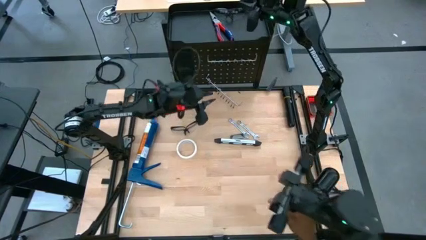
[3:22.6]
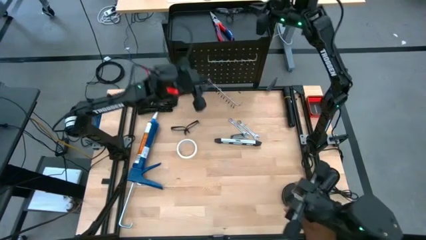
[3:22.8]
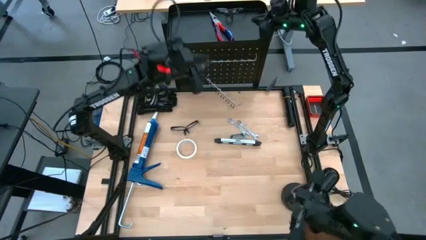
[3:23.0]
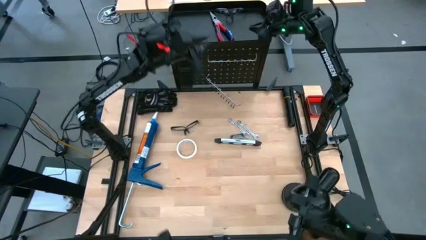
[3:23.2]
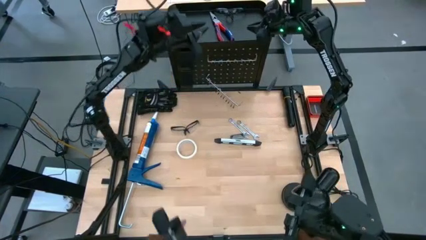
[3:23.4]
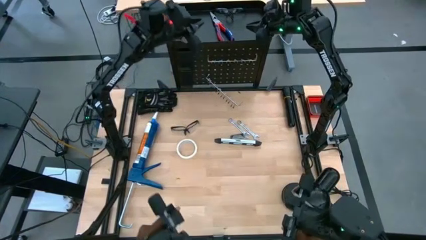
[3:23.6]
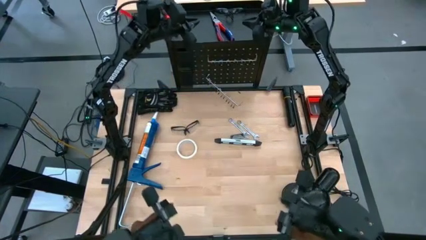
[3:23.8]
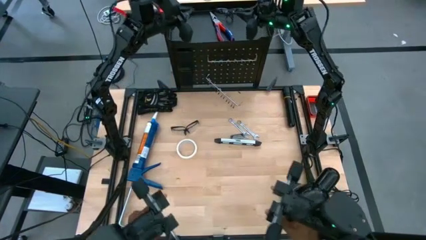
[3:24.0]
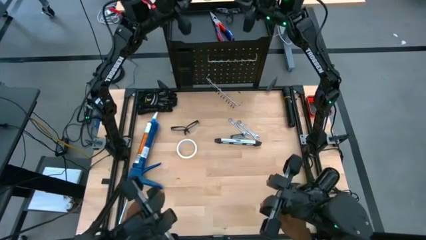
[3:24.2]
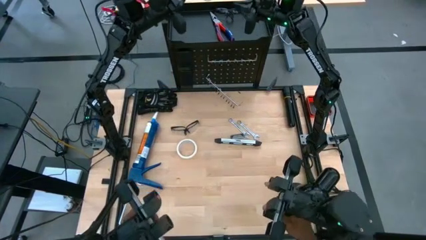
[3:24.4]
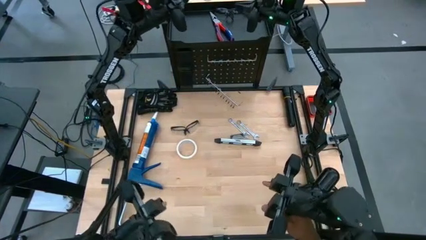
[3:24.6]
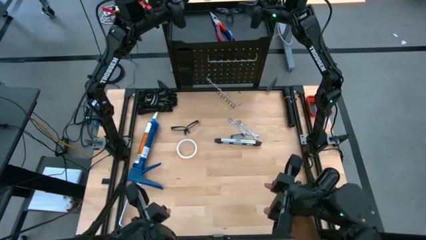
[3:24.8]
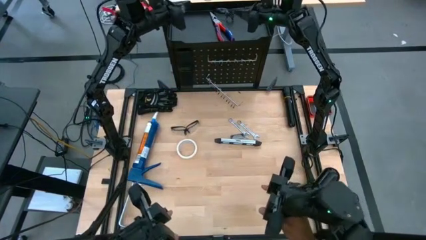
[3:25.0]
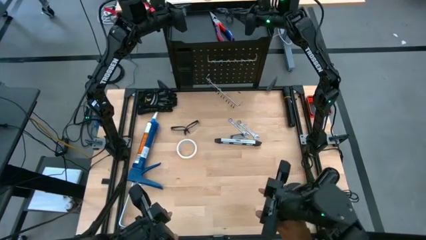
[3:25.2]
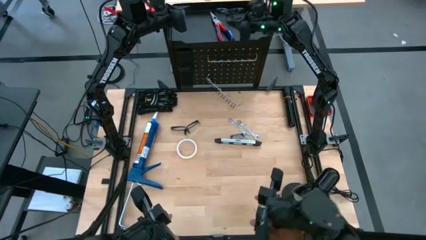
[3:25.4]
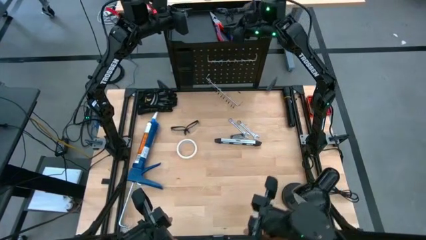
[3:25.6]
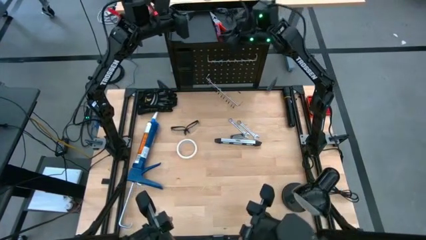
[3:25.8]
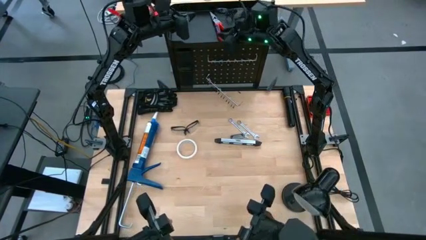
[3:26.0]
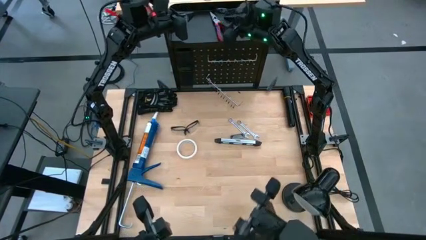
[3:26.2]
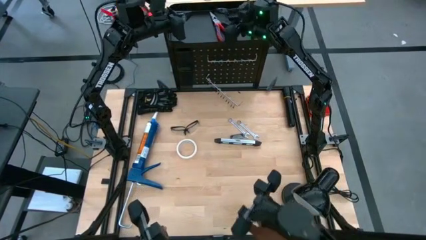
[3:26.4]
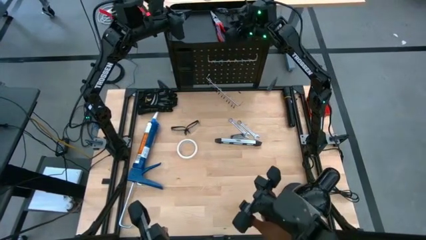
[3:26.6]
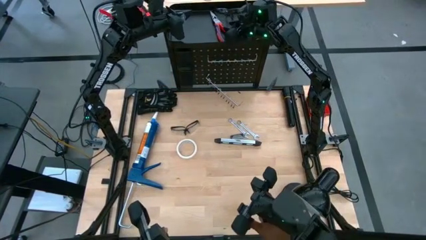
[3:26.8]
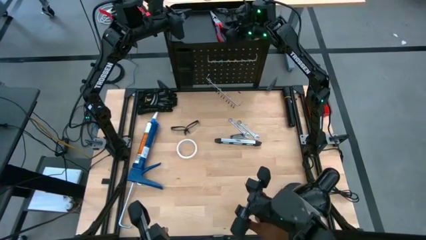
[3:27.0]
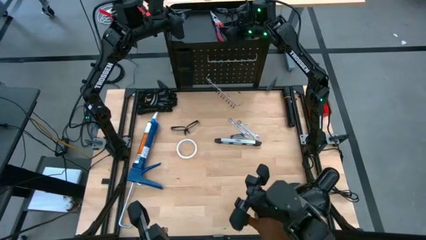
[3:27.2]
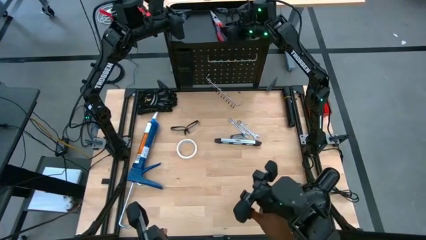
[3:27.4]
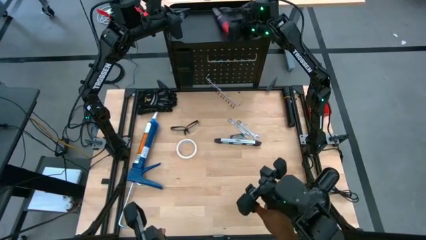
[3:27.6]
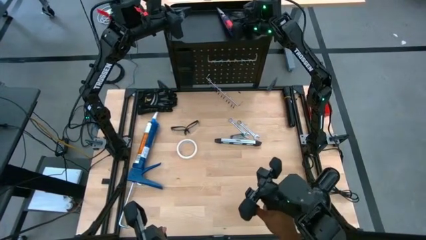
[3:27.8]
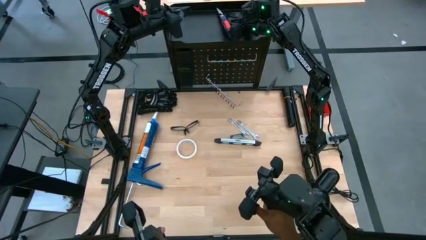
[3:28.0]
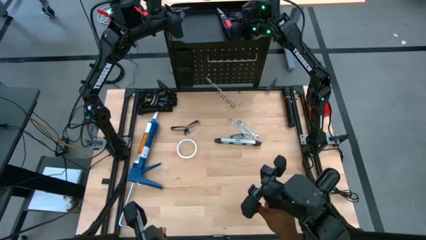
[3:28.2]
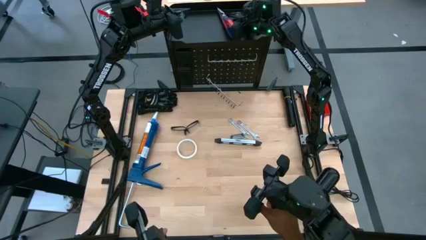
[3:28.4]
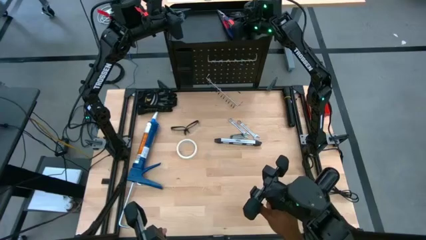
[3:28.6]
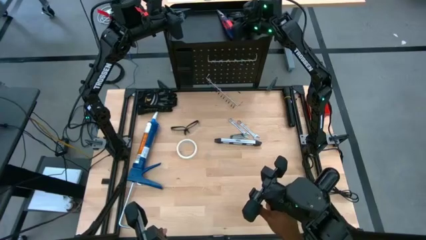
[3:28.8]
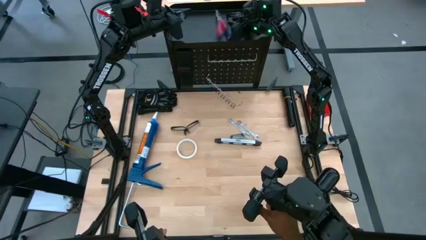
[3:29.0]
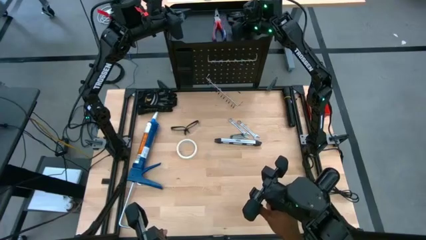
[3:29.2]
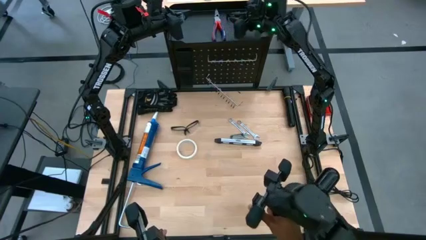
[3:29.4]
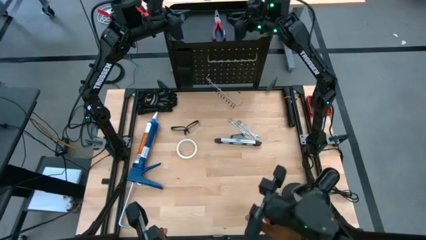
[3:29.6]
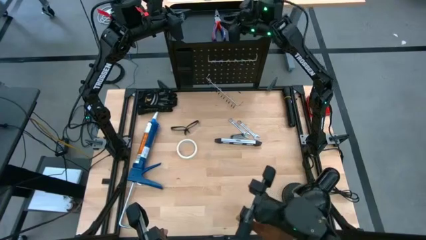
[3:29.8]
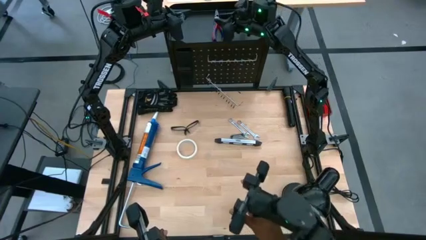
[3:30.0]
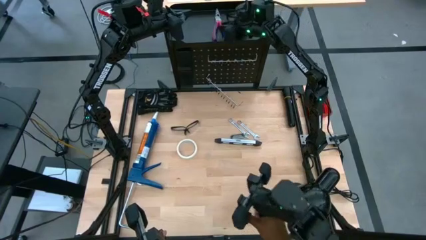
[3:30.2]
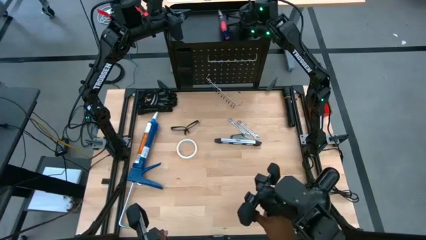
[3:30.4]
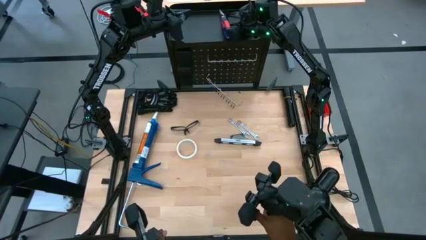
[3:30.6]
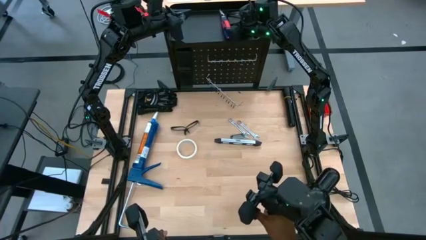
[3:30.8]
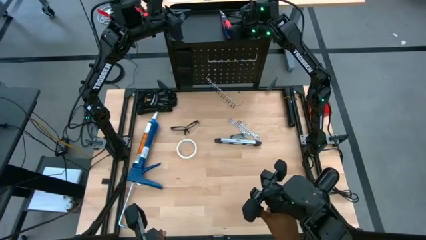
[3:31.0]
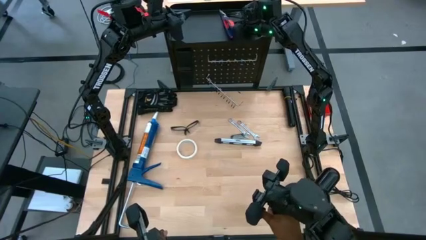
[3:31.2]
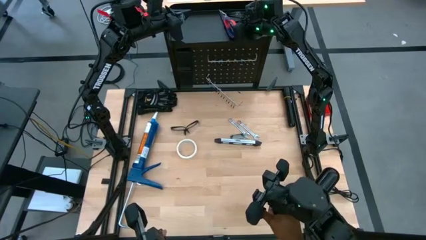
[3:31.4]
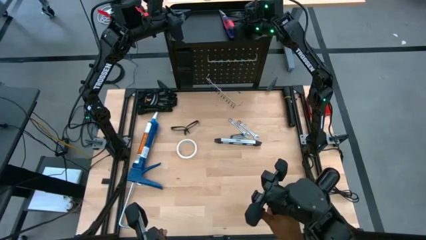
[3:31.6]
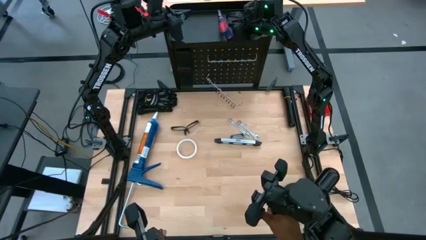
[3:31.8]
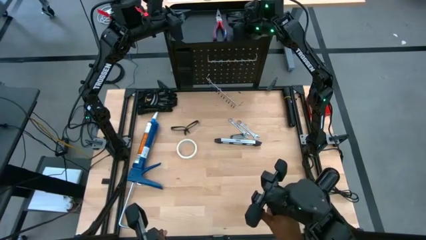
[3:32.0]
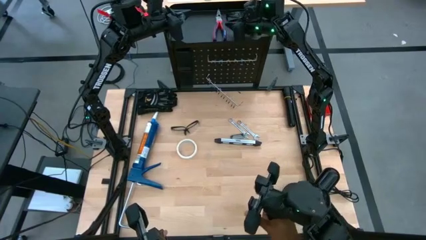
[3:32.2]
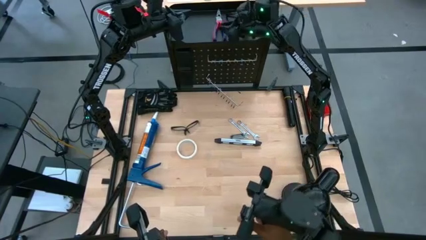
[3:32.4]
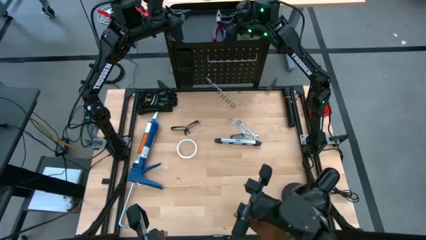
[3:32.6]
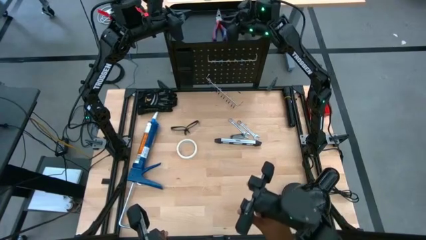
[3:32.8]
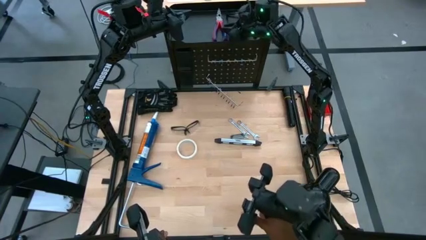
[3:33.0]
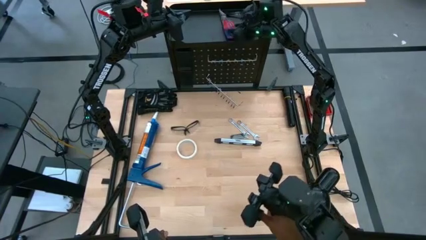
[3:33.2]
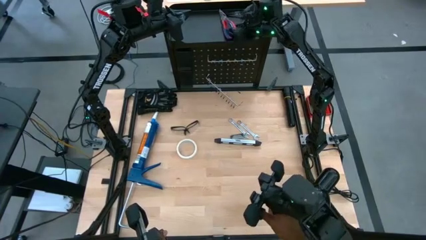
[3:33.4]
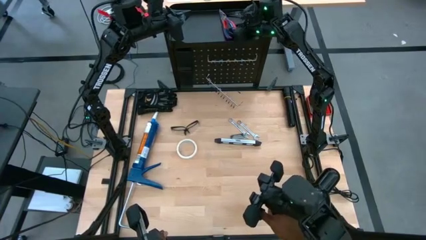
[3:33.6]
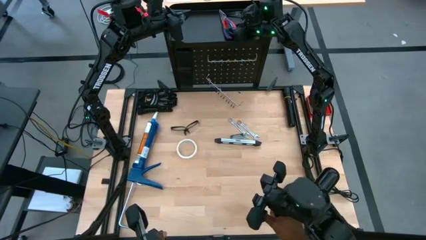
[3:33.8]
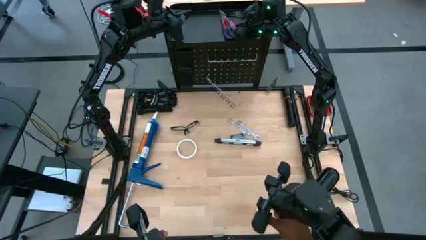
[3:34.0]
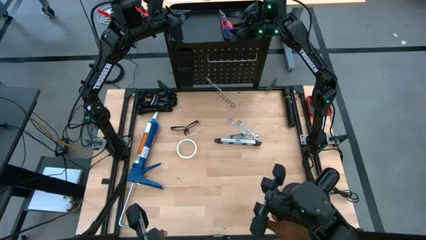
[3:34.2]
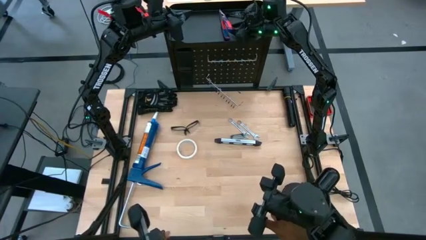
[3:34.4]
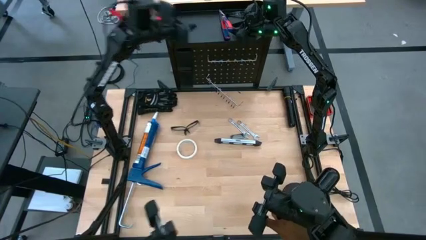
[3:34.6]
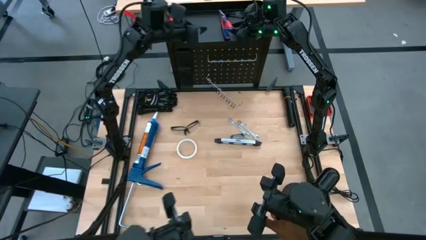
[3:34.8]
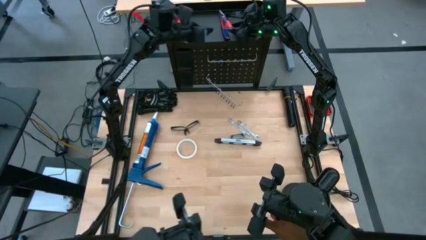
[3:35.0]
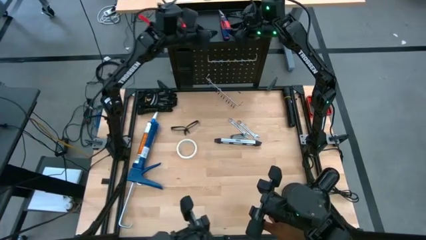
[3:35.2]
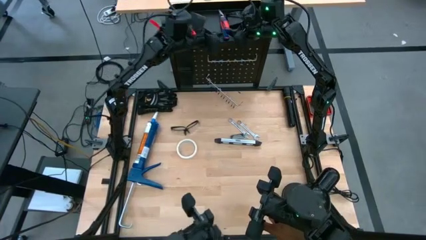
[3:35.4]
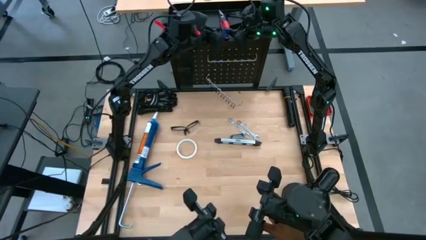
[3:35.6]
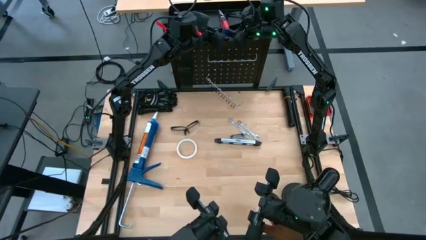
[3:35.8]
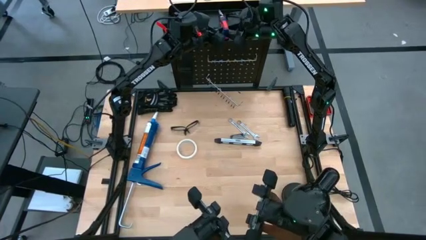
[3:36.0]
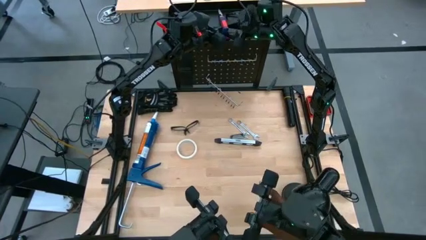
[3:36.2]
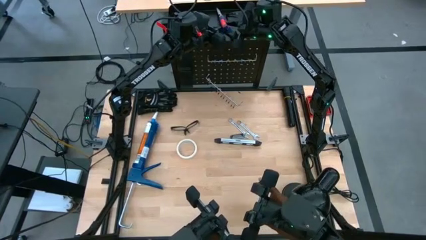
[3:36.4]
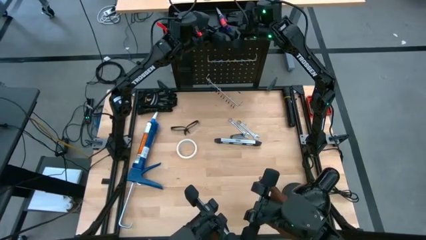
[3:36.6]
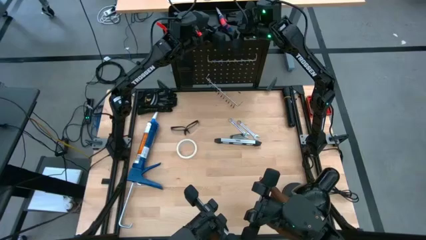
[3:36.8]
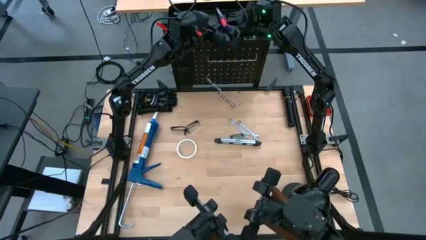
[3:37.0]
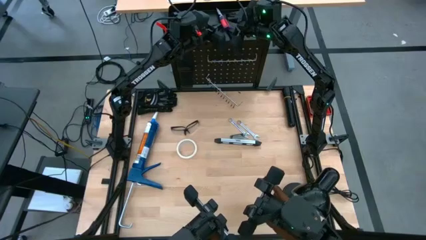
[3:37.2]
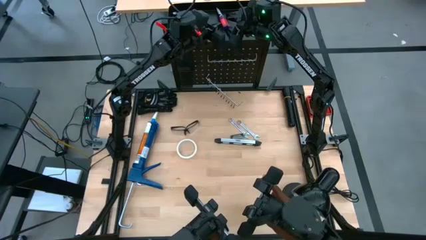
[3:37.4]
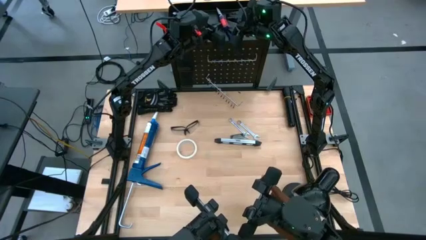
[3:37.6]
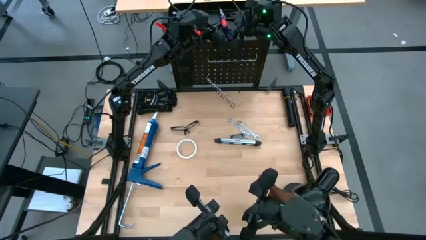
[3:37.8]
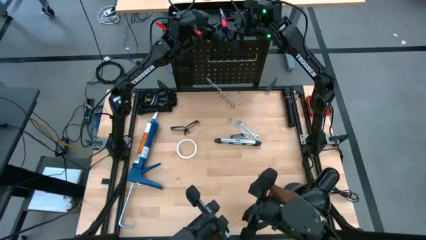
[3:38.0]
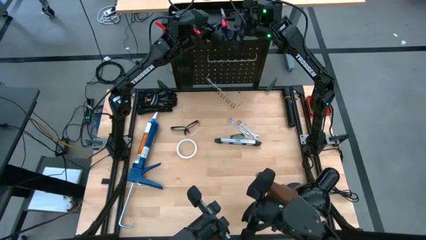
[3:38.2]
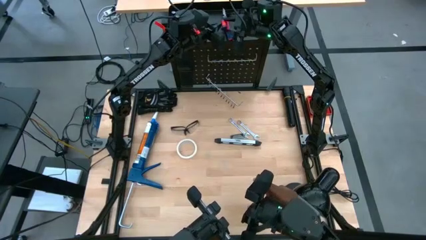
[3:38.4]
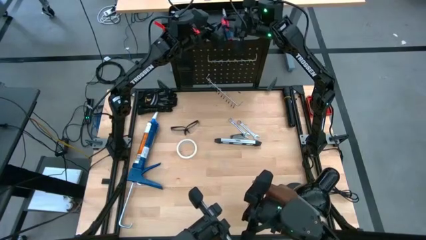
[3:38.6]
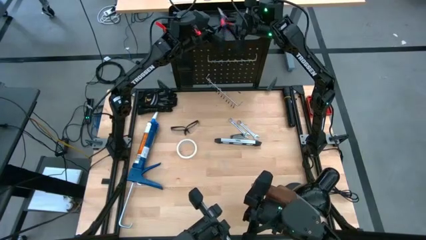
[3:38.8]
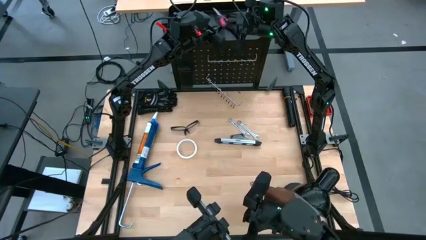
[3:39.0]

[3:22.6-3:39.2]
Task: Hang tools onto peg board
Remove the pliers from the peg board bin
